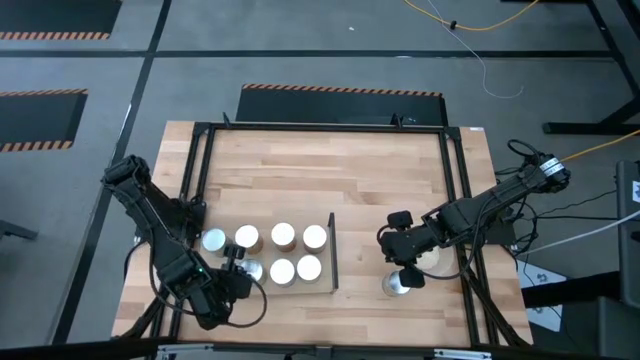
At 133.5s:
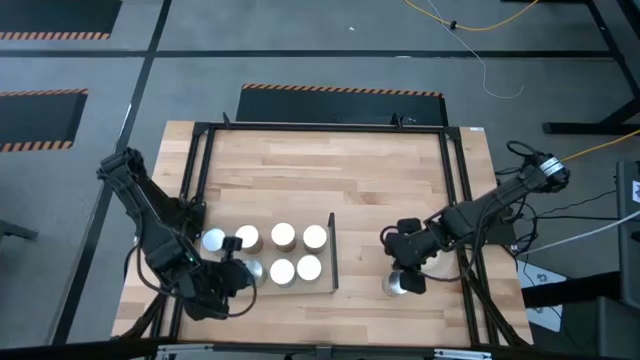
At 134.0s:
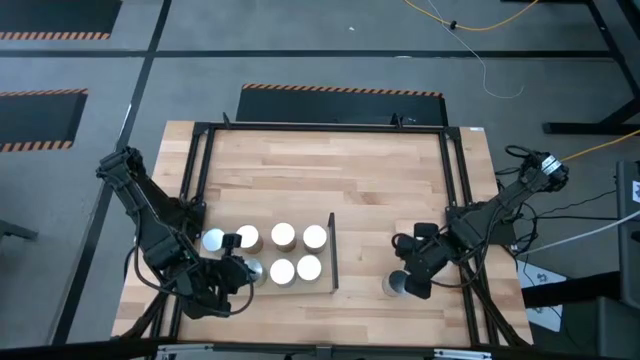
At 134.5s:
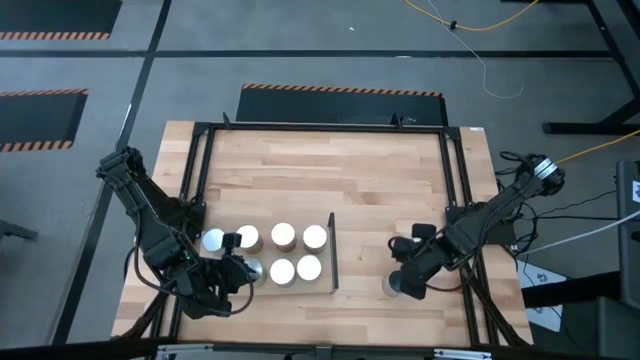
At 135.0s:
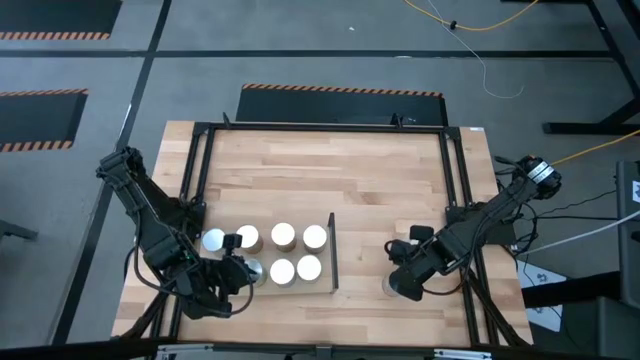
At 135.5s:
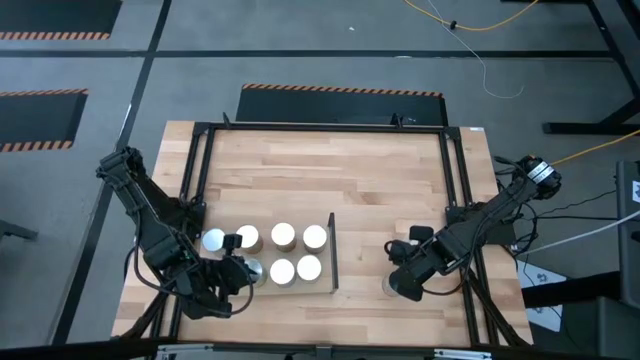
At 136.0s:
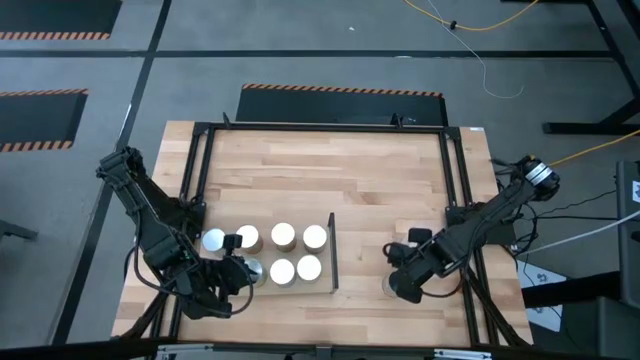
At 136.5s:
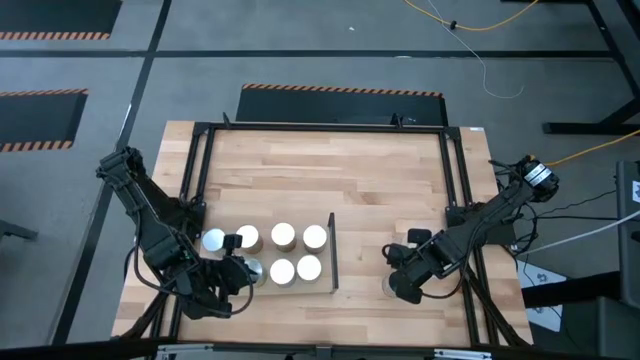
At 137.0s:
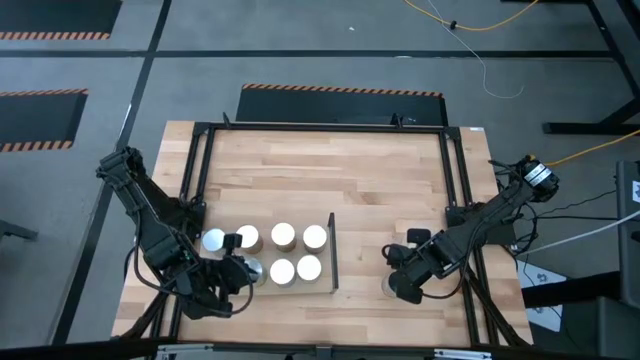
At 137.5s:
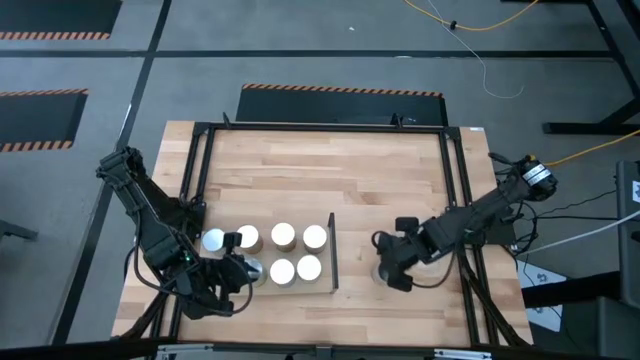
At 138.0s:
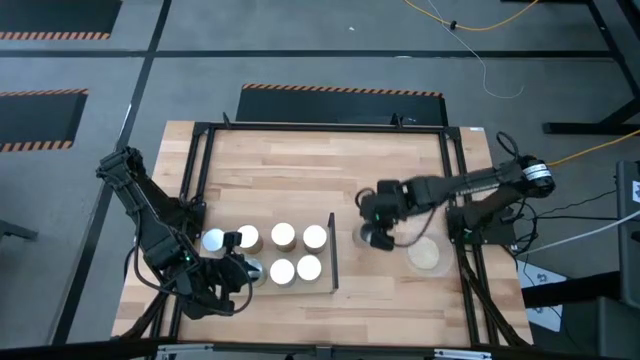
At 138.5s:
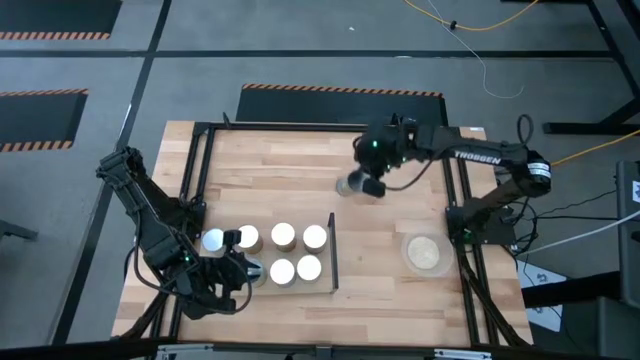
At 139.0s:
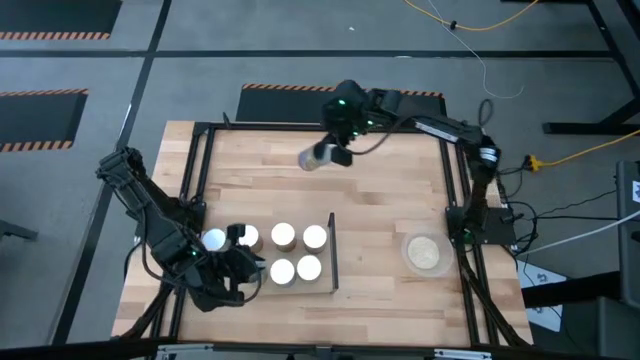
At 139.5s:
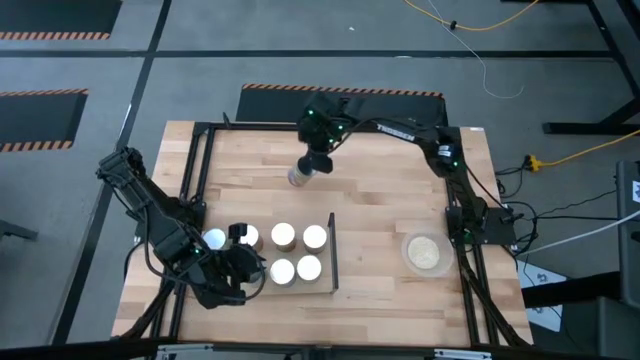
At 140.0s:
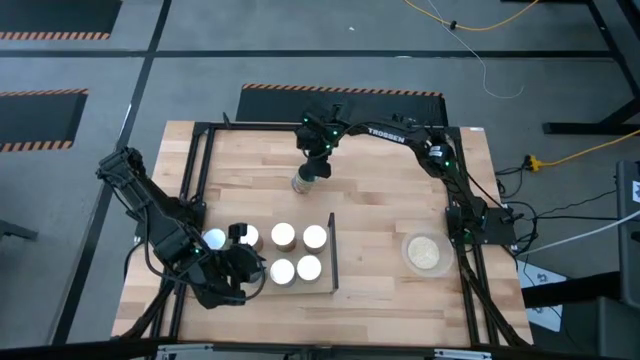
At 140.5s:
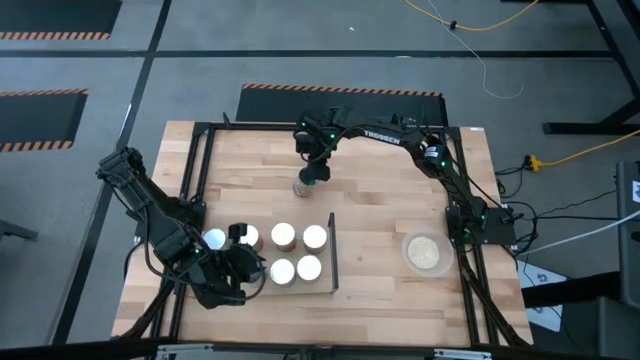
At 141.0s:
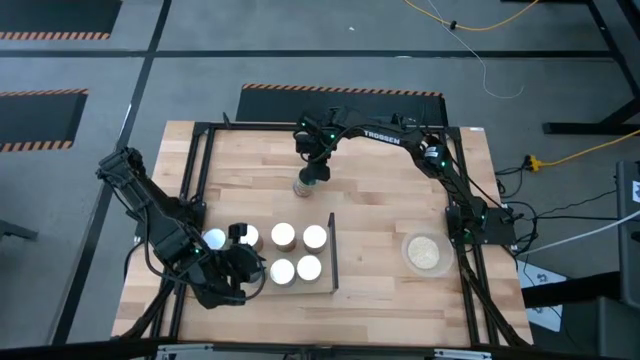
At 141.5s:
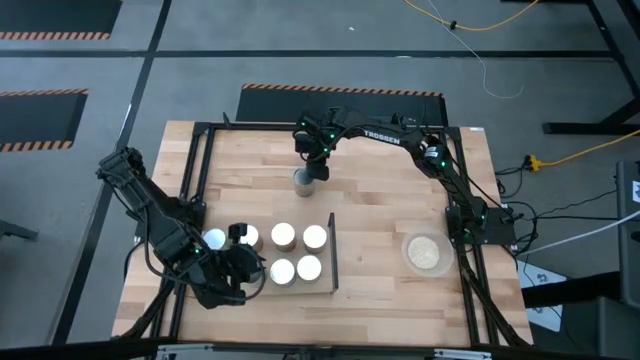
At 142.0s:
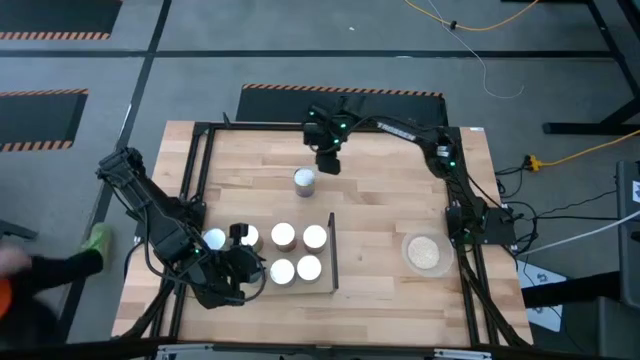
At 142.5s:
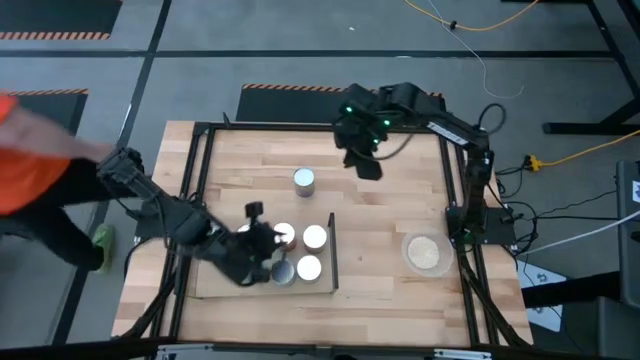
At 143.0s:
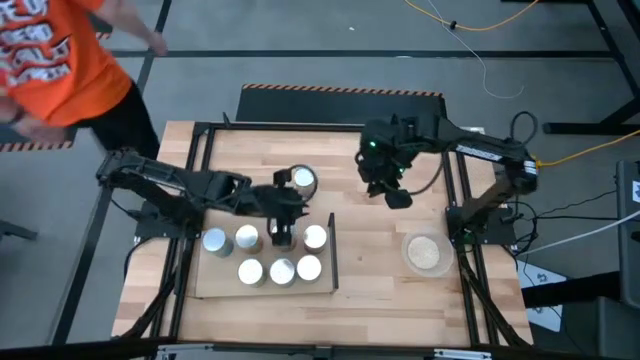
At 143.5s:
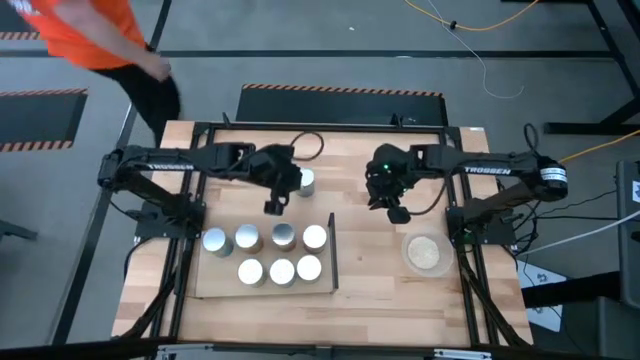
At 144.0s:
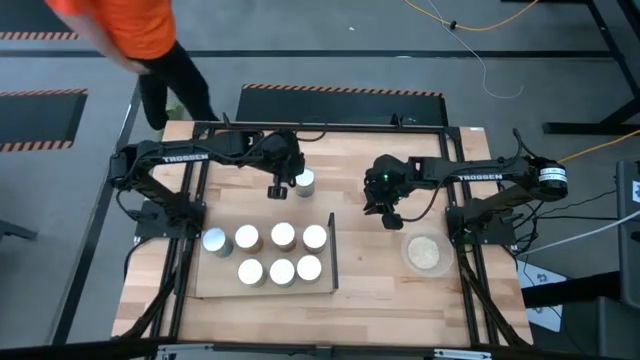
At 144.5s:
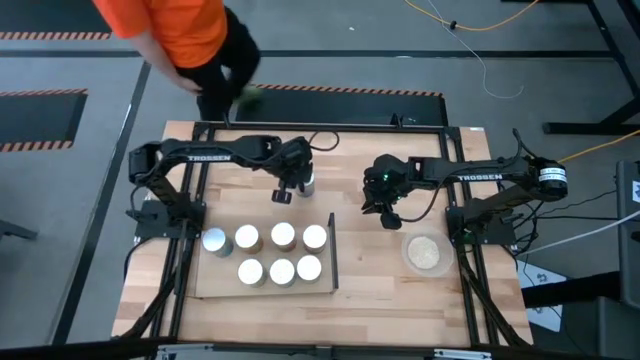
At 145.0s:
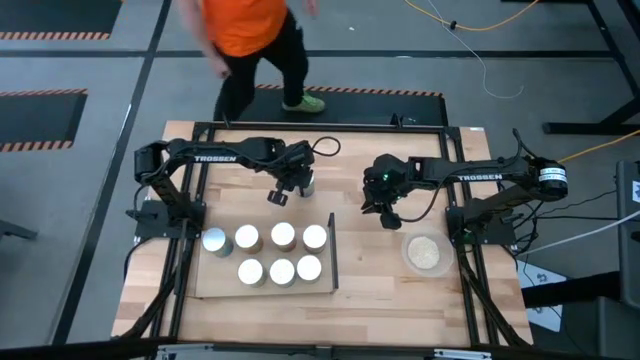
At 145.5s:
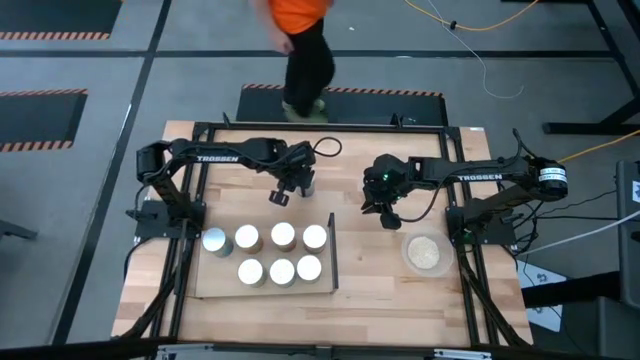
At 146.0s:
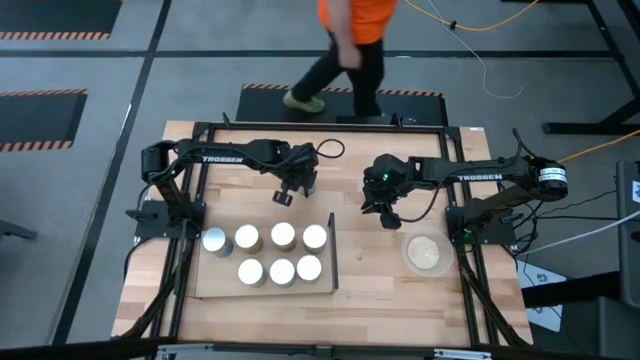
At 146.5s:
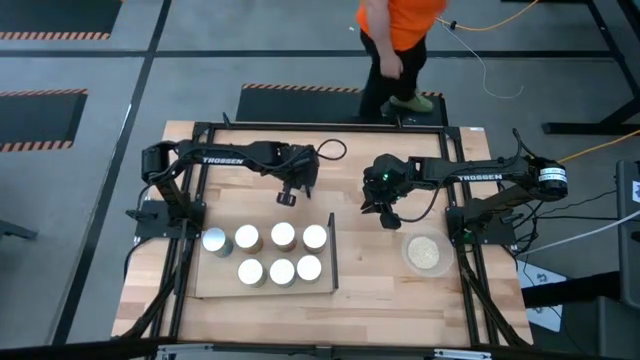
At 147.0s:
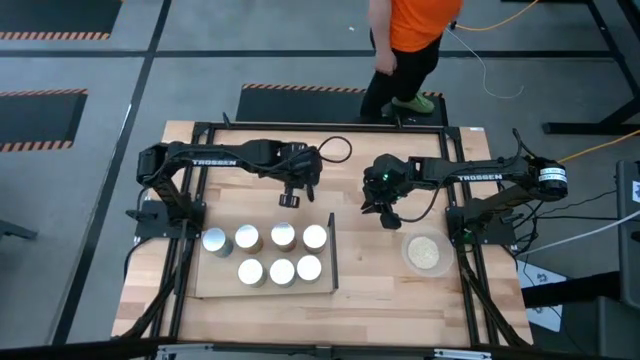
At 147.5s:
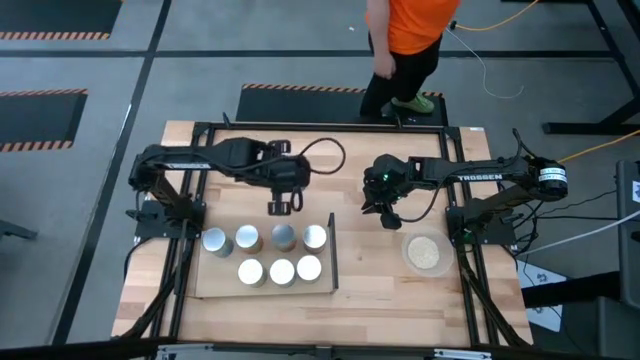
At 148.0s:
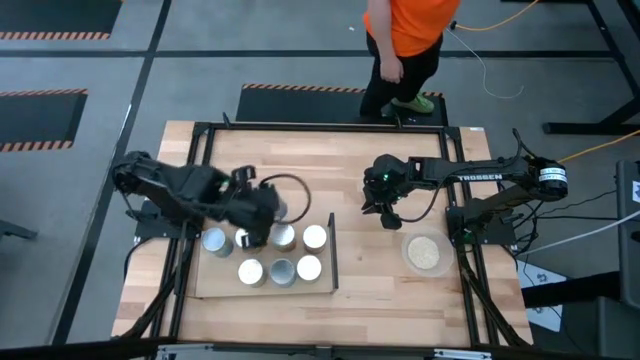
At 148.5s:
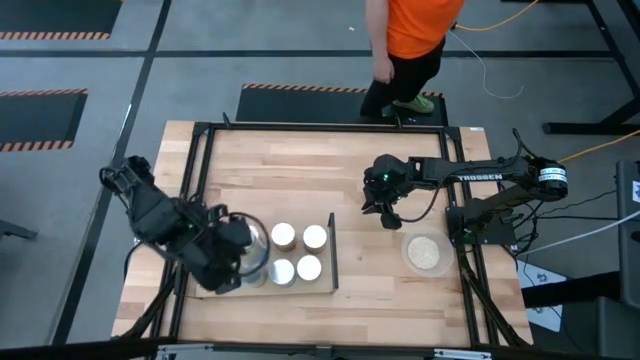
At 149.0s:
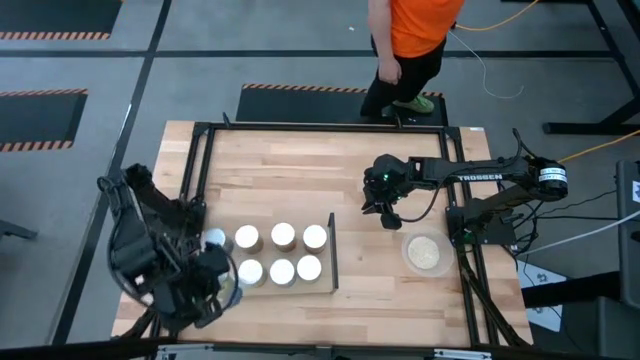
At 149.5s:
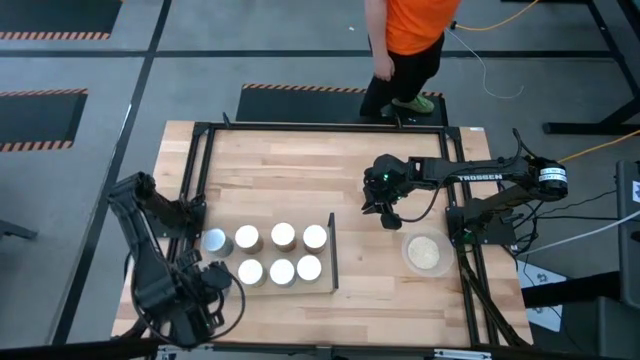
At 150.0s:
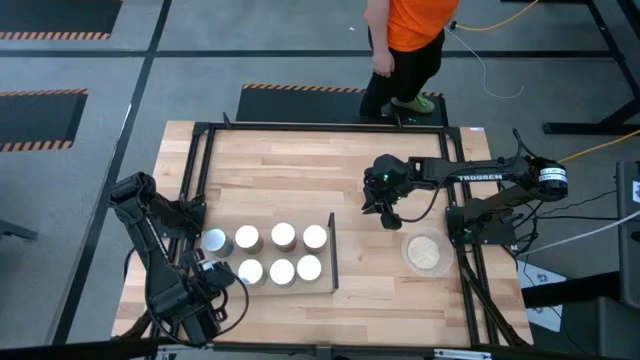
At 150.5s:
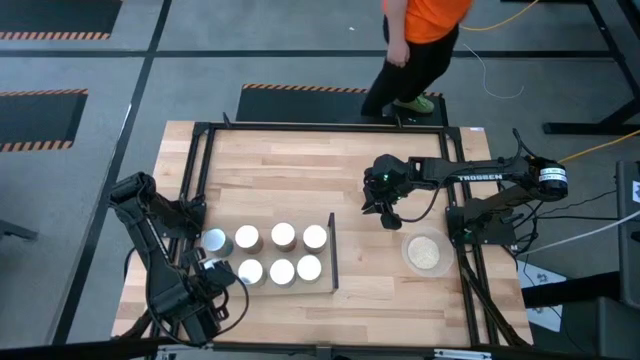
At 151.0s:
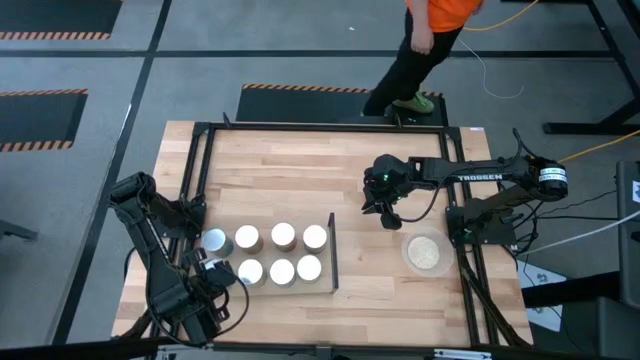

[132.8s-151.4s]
Task: Pick and place cans onto a shelf
Put the peach can on the shelf

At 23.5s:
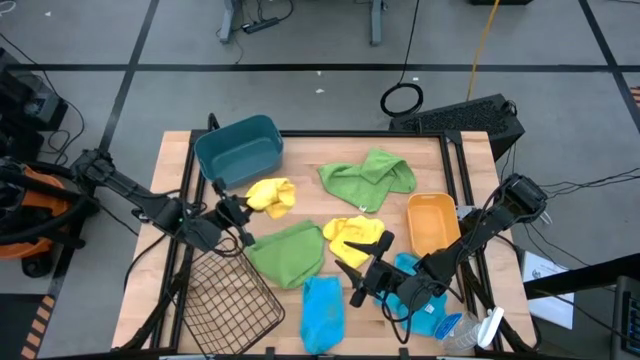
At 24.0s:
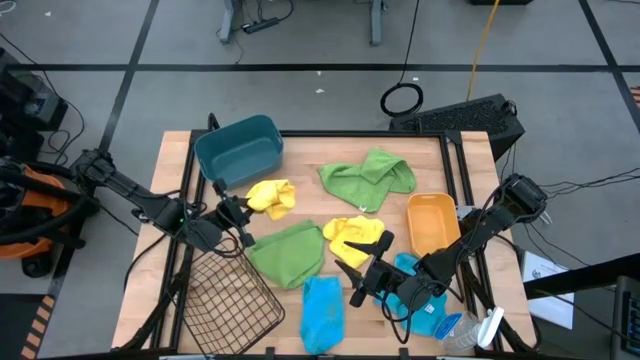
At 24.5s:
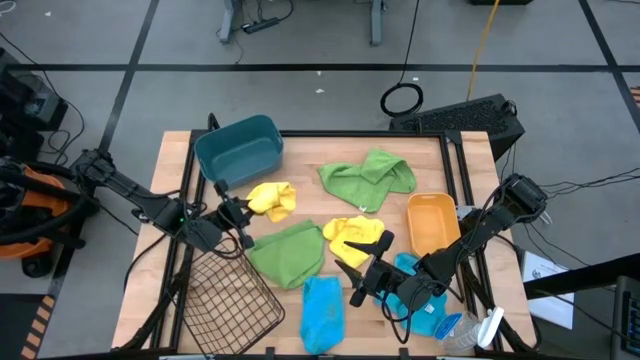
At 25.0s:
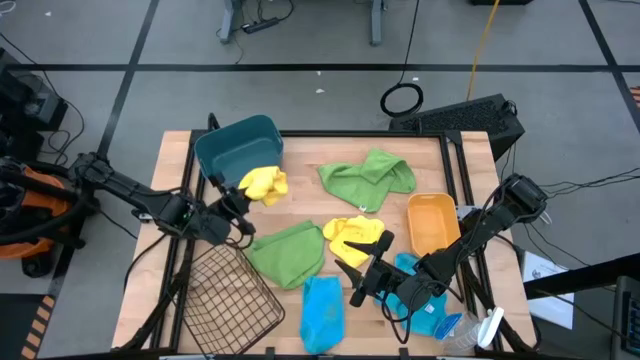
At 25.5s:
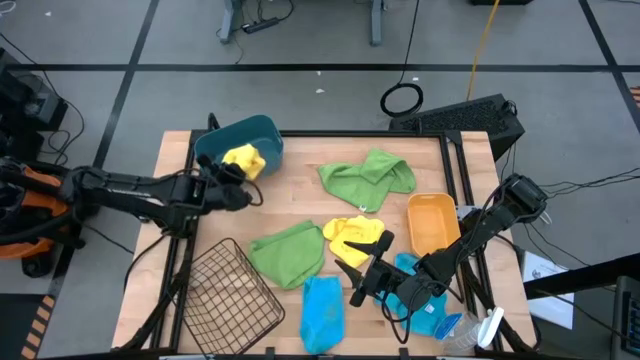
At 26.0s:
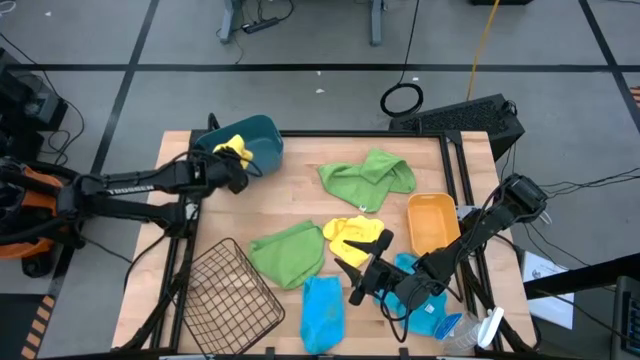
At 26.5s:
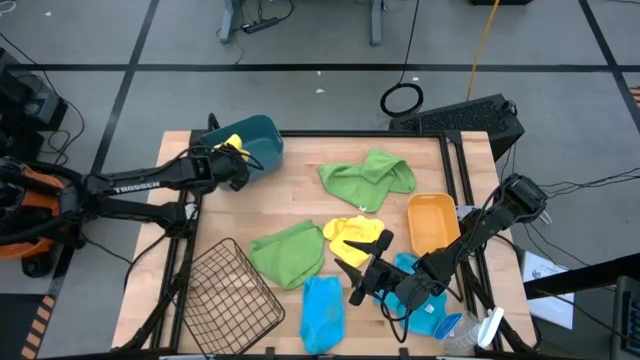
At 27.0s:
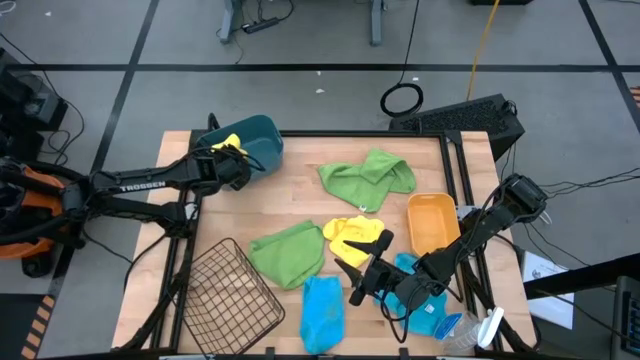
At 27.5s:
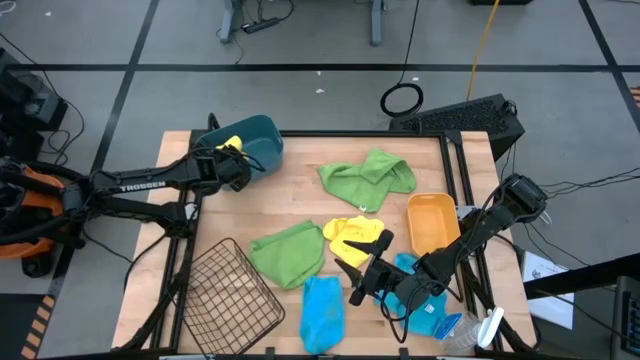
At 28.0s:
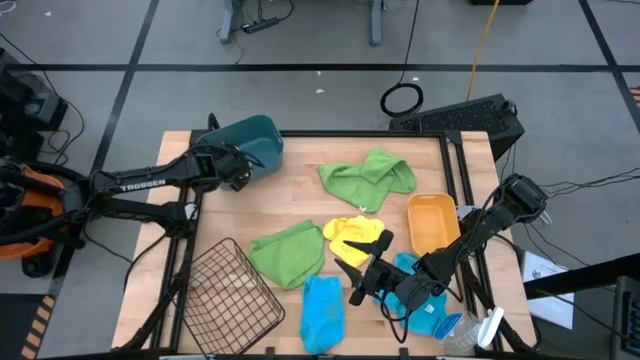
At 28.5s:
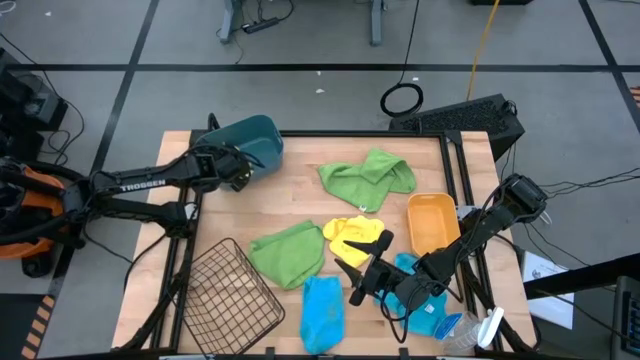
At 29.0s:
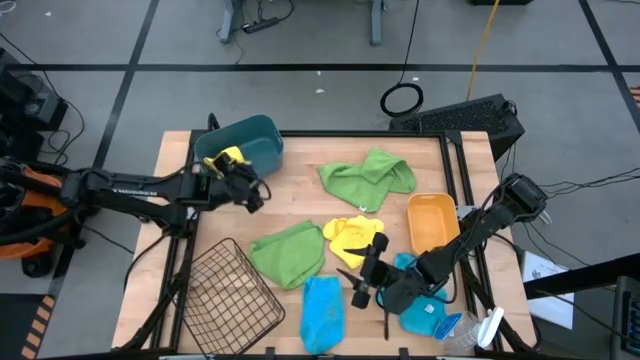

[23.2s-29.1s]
Task: Sort microfiber towel by color & place in baskets
Put upper left yellow towel into the green bin
